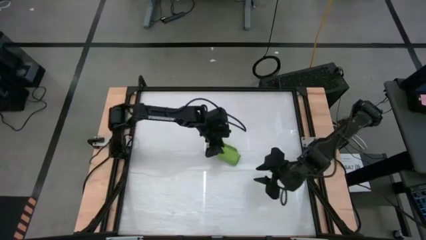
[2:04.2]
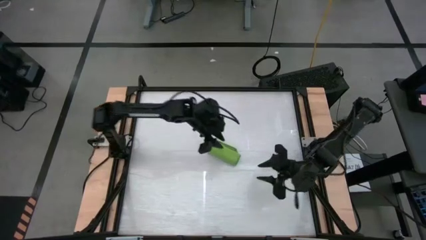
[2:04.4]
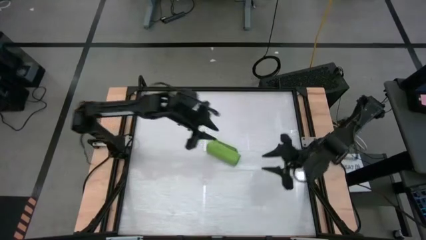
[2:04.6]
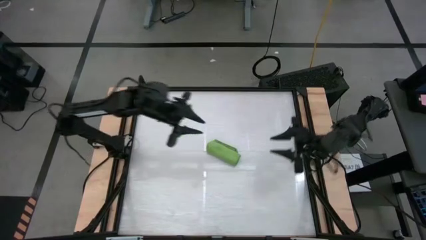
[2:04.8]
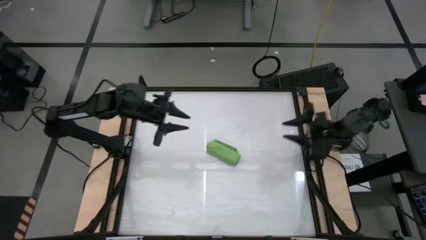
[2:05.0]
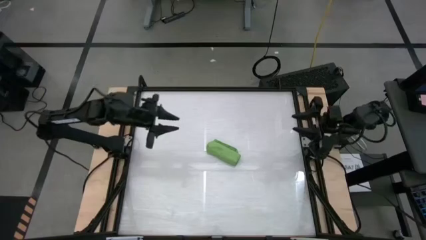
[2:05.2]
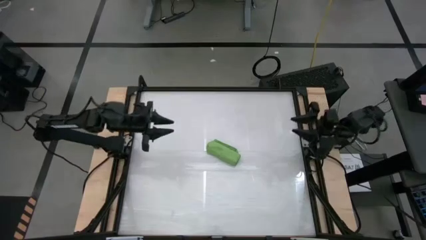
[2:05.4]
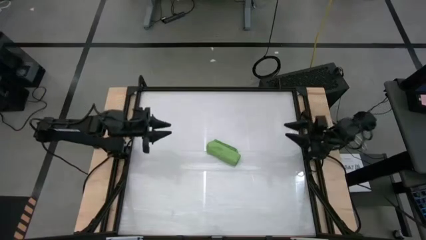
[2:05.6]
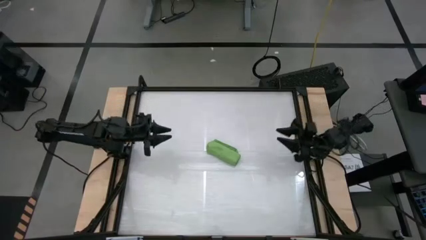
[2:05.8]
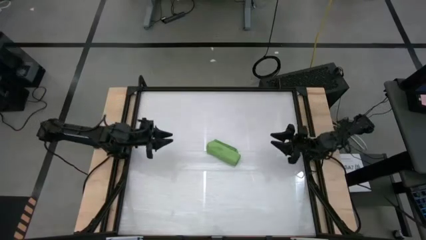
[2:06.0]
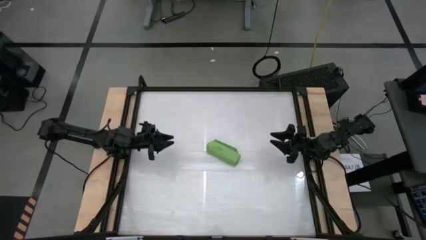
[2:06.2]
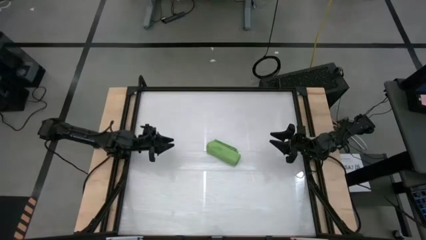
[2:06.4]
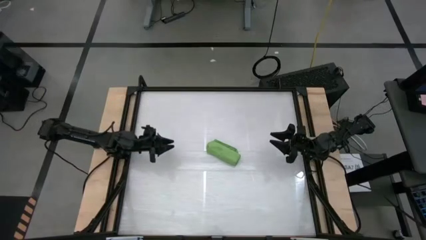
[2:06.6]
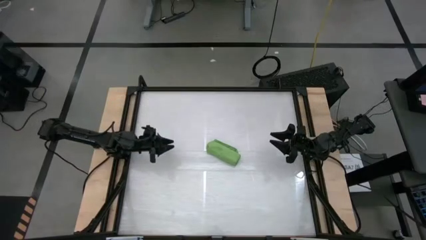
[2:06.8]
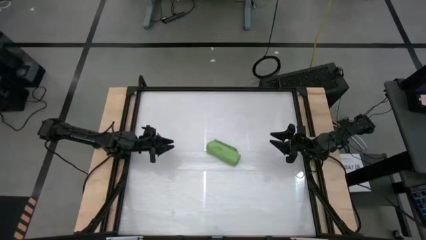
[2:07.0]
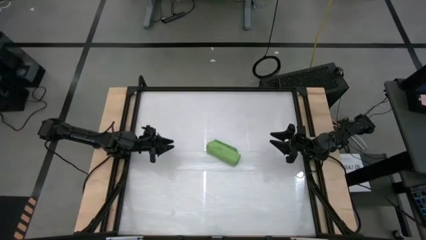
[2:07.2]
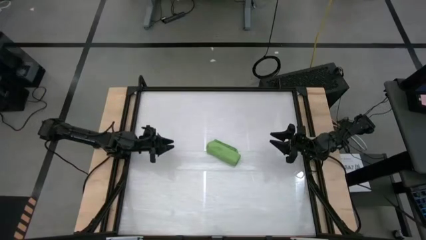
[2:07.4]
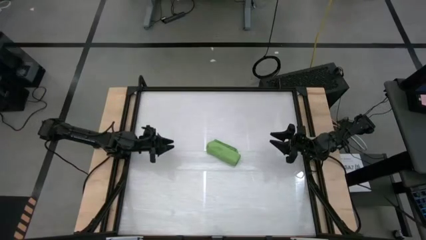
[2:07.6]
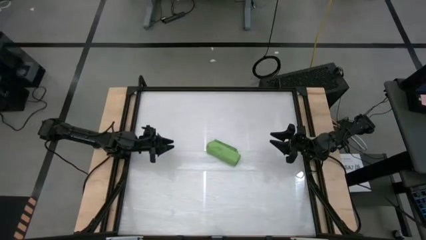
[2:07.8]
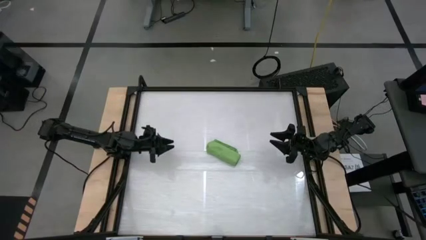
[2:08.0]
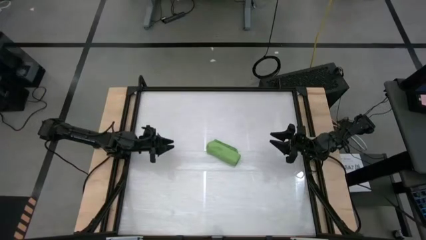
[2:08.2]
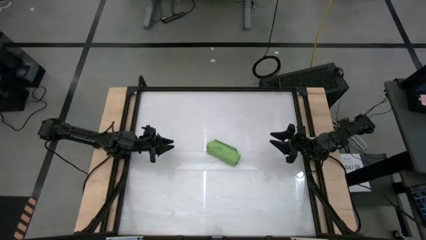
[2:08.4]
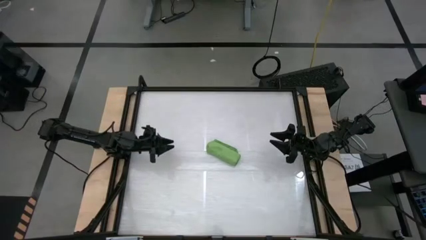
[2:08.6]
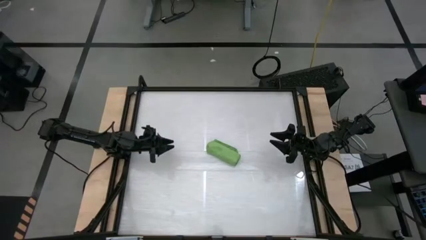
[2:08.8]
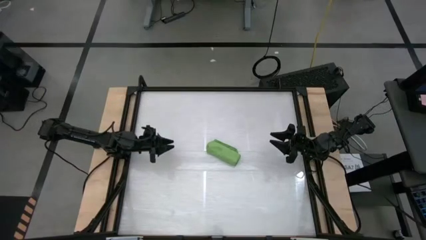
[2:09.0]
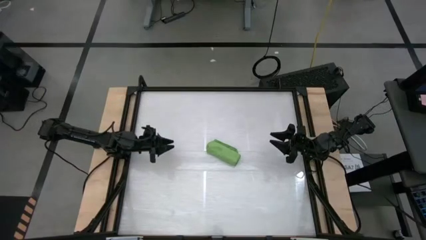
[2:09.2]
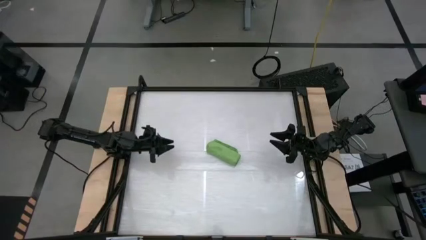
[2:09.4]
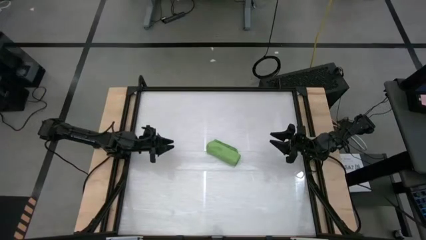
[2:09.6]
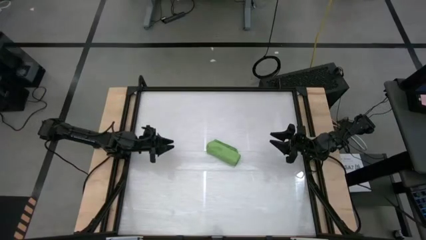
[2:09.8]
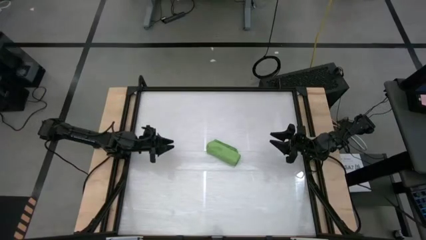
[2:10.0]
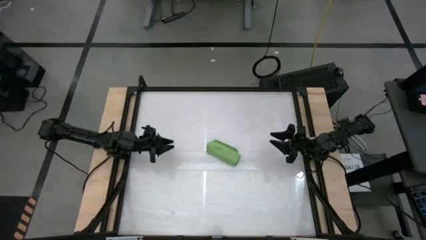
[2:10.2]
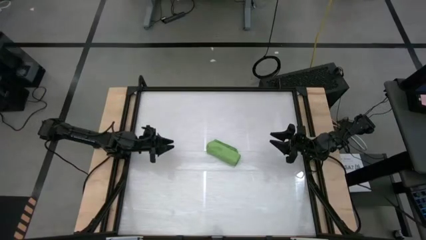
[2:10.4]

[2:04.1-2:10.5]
Task: Roll towel
Return to Home Position

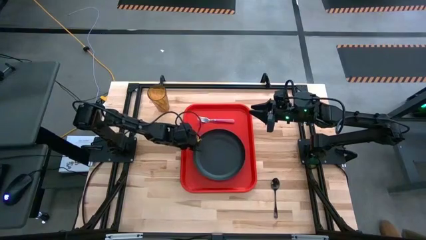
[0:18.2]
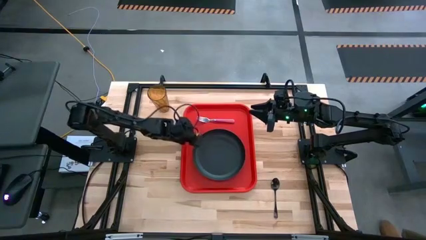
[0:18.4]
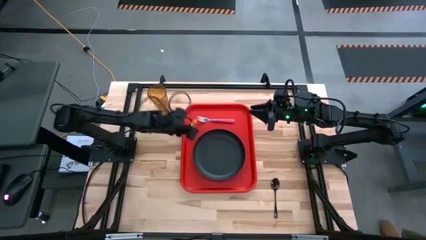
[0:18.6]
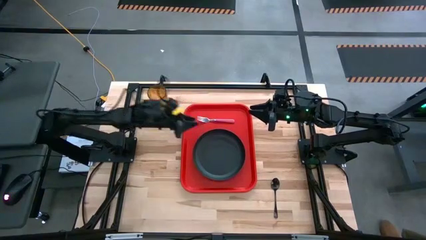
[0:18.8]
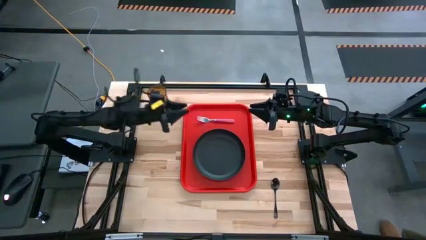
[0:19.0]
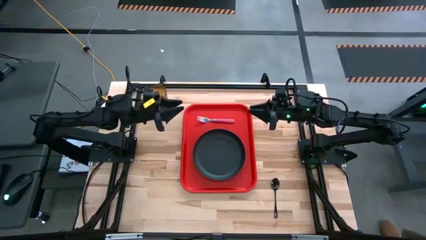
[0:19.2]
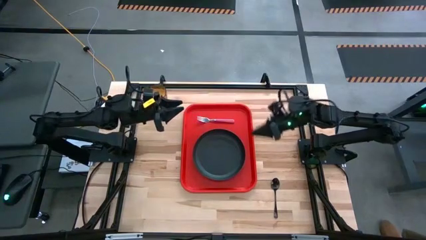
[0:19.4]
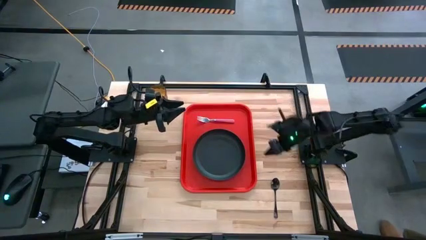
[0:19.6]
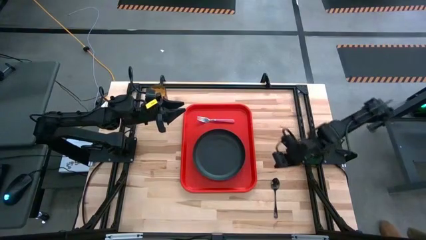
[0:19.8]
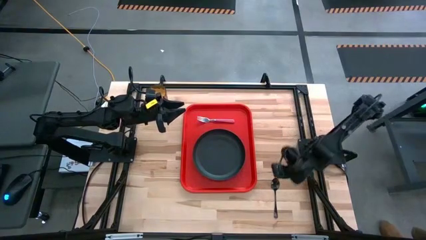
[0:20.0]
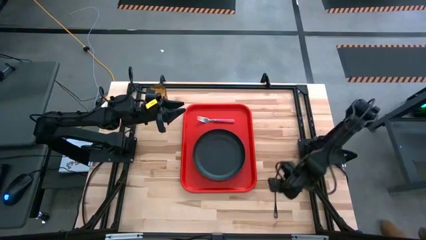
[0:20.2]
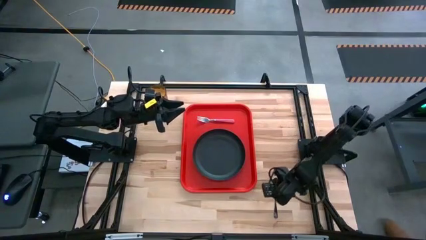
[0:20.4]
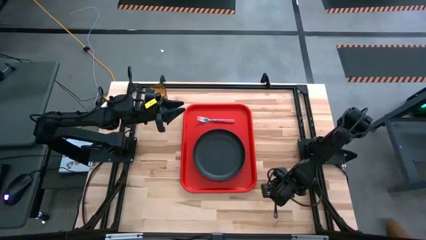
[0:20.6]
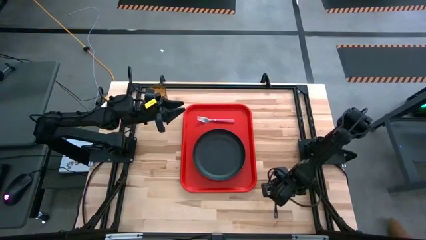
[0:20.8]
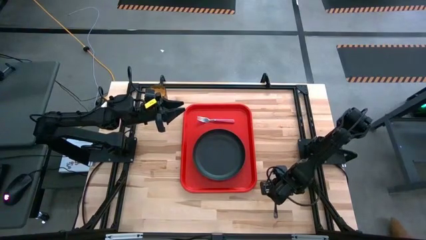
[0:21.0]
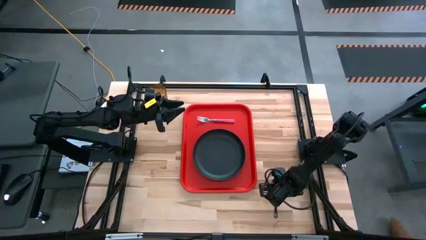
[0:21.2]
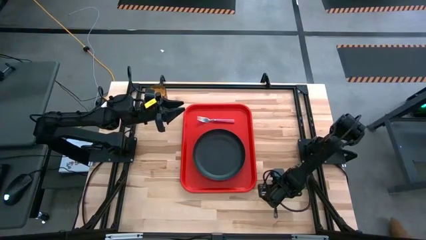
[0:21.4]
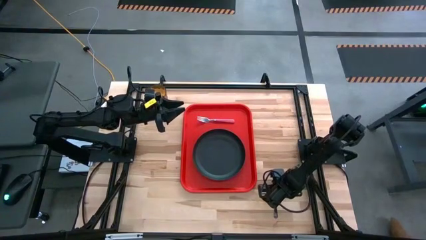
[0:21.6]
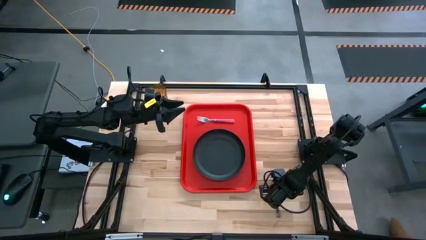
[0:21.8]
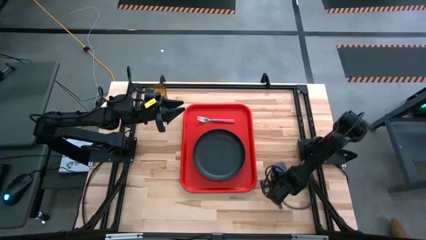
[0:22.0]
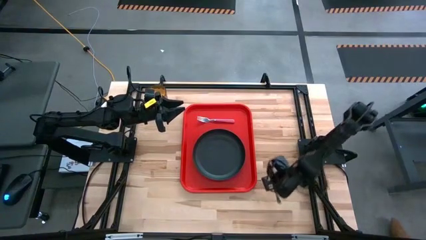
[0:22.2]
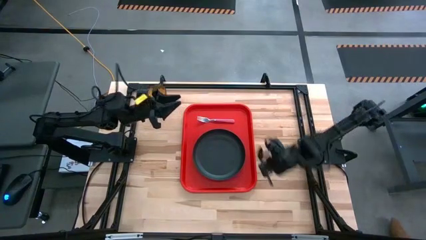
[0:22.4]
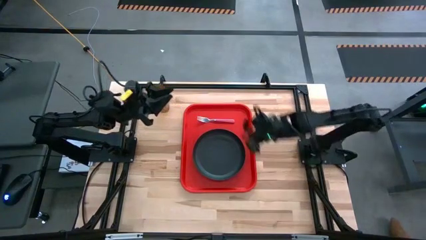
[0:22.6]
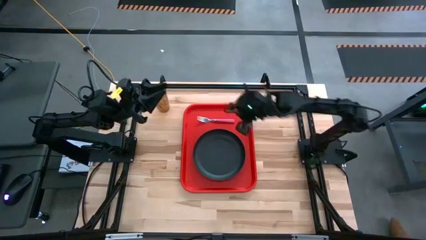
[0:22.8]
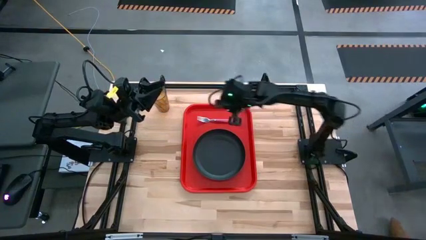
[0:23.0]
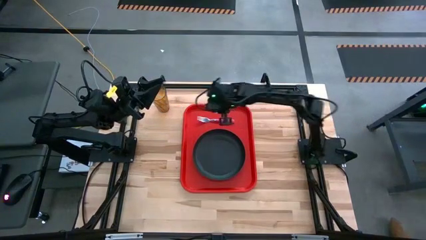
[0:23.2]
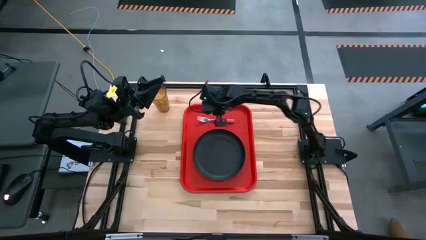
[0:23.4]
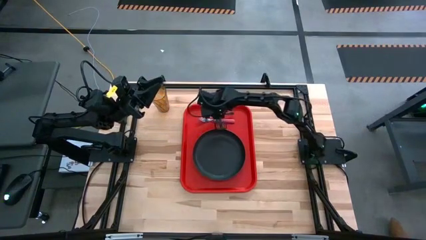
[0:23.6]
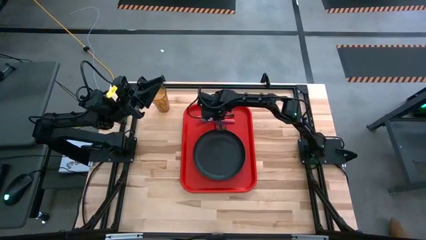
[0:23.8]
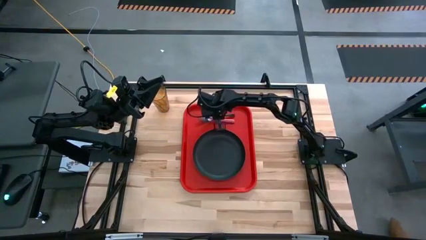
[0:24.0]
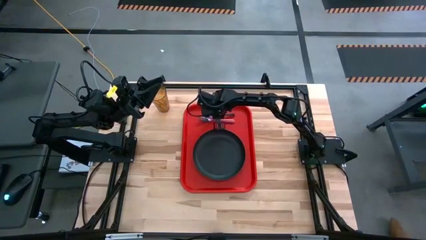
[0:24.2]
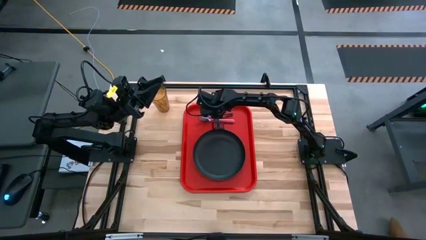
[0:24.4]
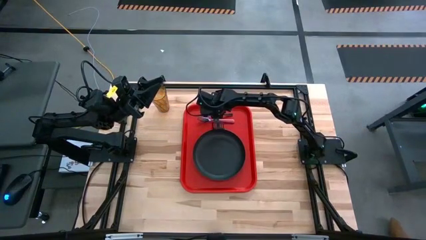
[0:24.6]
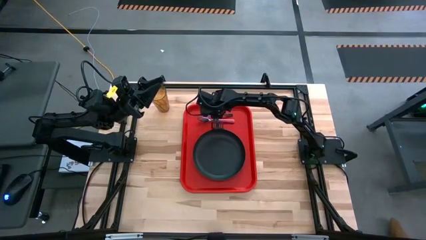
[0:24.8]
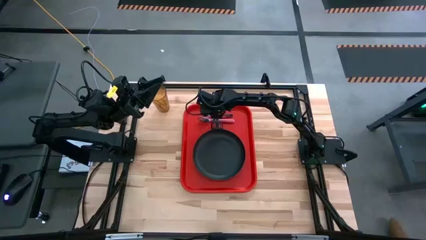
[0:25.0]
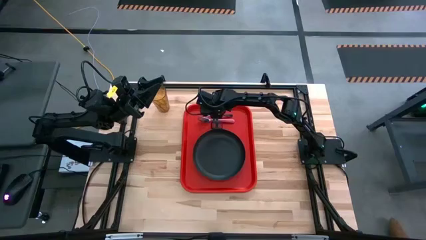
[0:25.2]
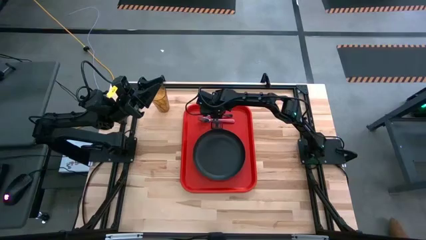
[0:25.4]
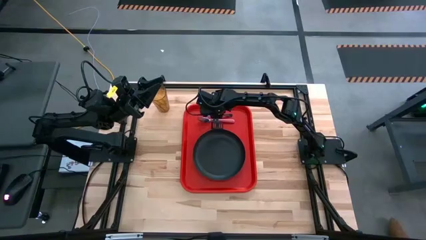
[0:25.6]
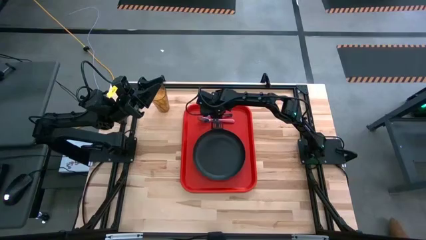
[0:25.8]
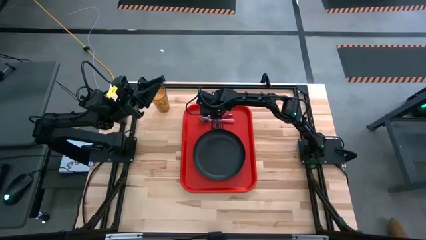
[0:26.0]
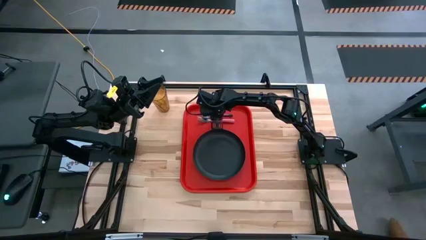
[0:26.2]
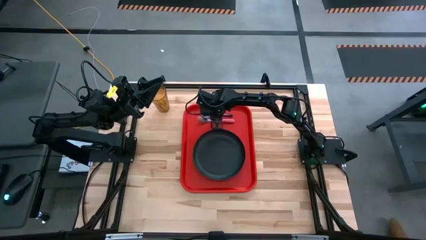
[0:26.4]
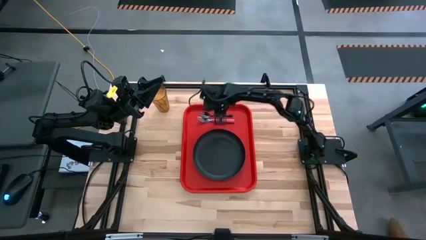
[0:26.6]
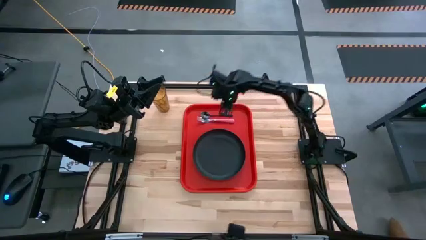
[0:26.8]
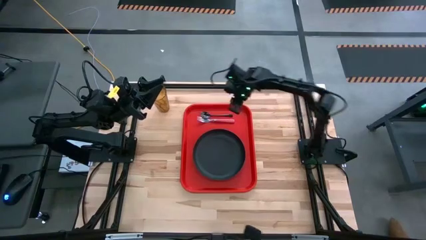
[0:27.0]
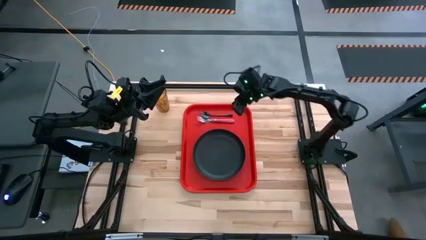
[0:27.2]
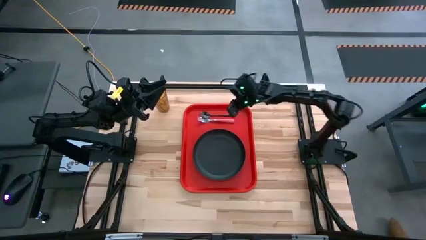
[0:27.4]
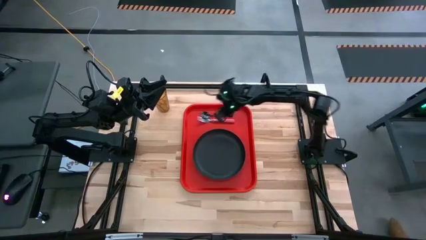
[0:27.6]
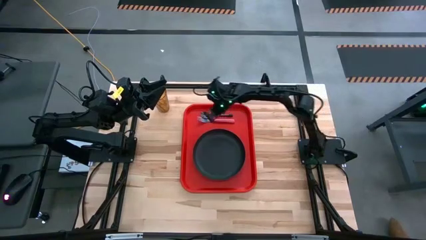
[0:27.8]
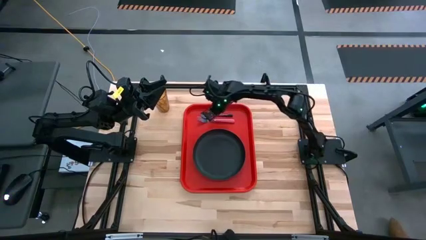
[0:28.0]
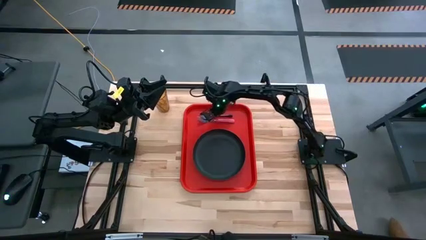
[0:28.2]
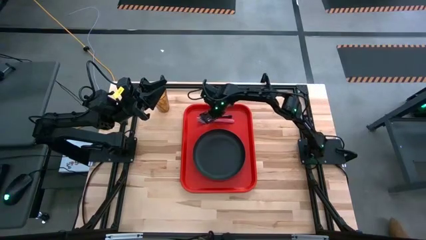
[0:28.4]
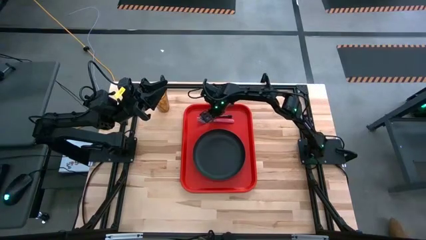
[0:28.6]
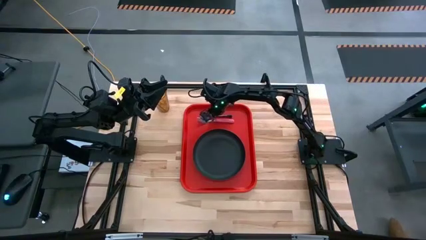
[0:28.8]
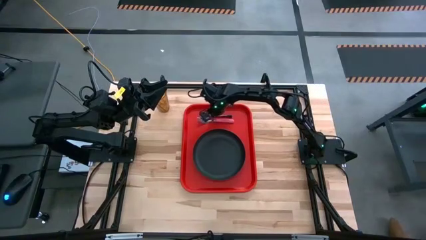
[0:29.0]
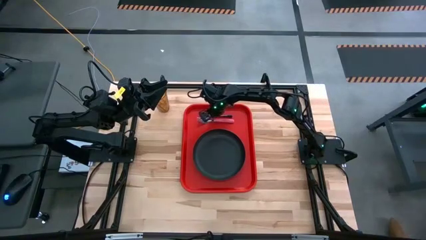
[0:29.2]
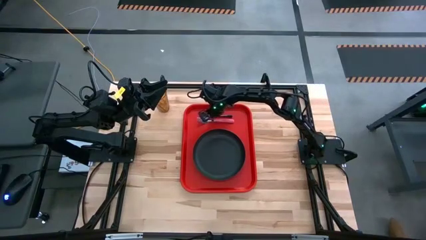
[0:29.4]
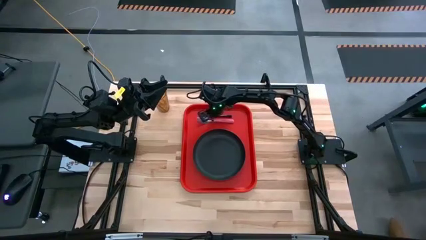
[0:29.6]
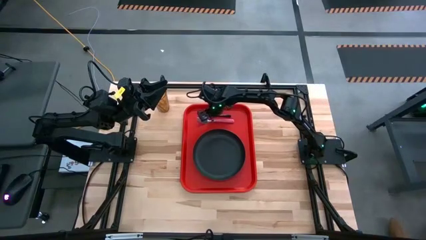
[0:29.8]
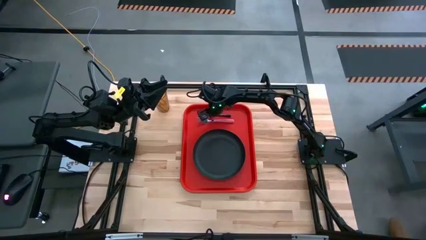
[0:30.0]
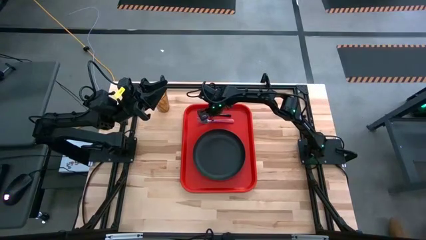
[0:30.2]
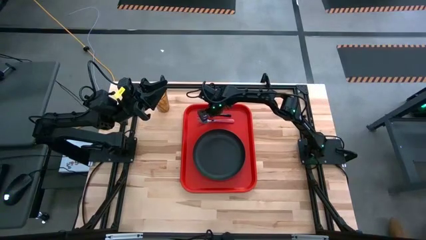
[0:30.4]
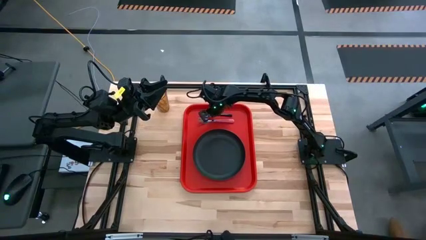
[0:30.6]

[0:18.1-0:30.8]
Task: Pick and place plate/cup/fork/spoon on tray
Put the black spoon on the top of the red tray
